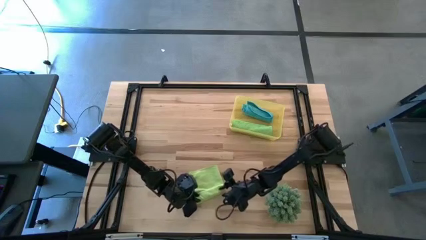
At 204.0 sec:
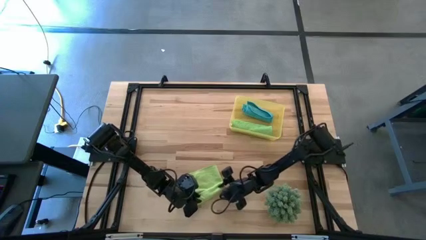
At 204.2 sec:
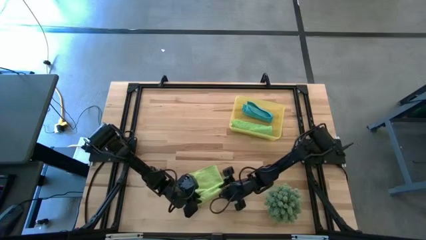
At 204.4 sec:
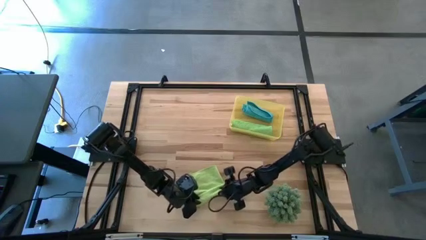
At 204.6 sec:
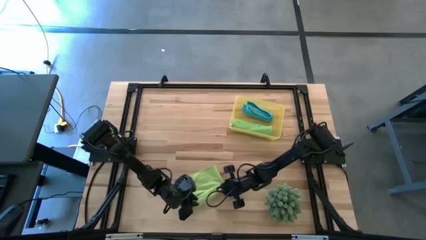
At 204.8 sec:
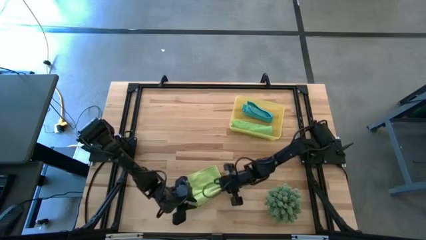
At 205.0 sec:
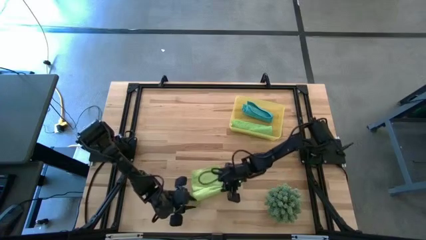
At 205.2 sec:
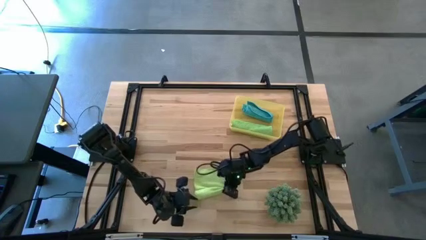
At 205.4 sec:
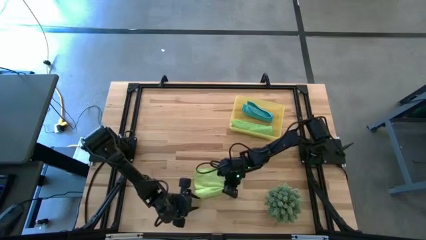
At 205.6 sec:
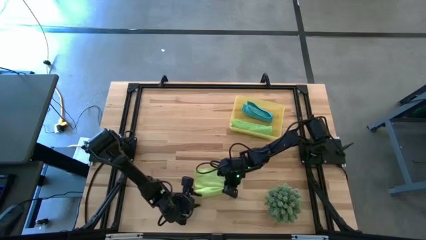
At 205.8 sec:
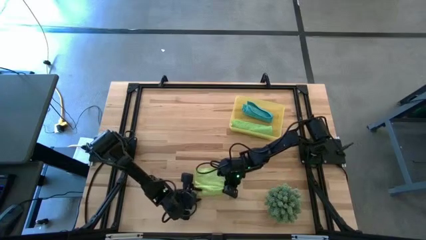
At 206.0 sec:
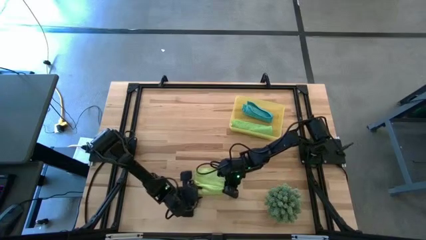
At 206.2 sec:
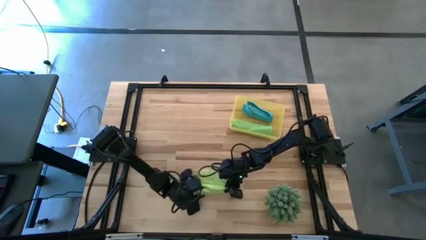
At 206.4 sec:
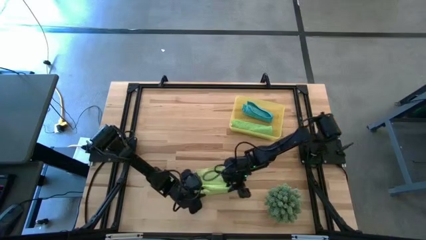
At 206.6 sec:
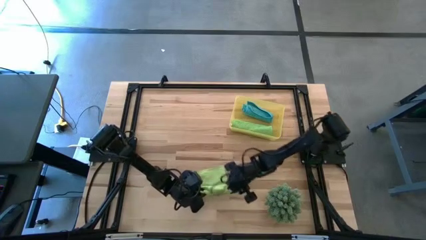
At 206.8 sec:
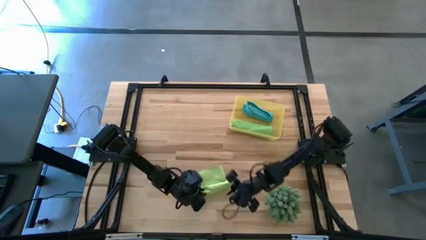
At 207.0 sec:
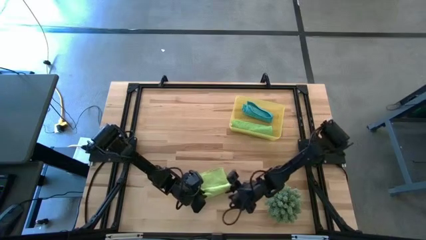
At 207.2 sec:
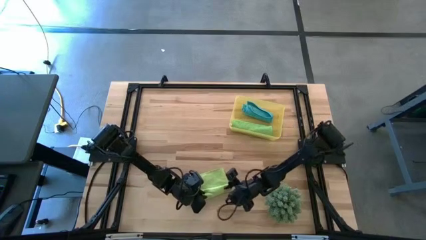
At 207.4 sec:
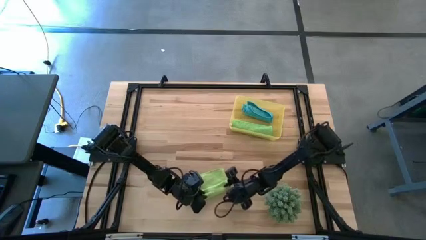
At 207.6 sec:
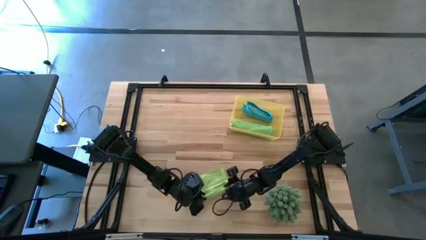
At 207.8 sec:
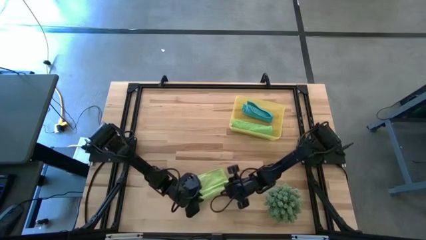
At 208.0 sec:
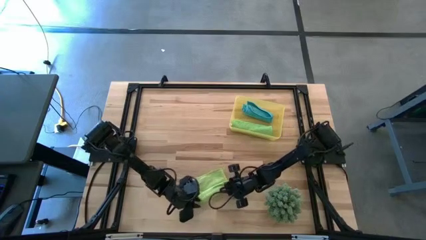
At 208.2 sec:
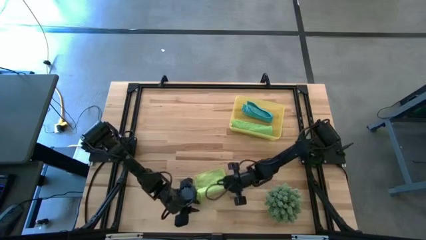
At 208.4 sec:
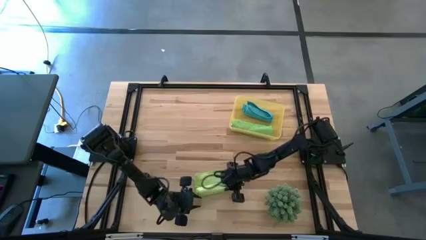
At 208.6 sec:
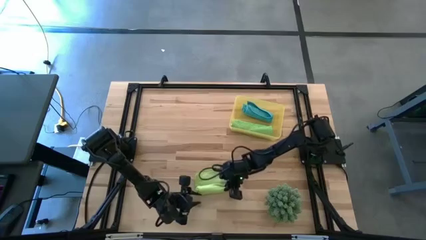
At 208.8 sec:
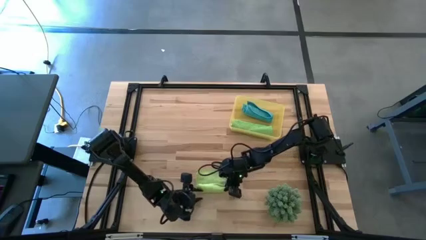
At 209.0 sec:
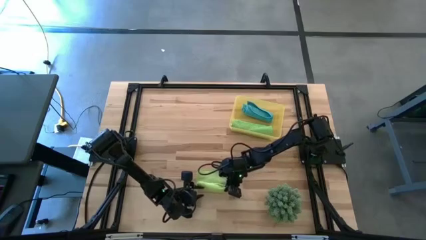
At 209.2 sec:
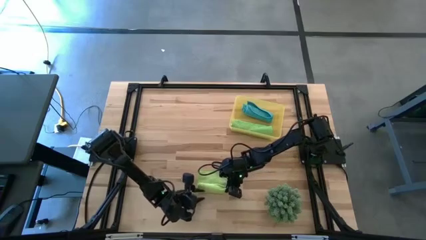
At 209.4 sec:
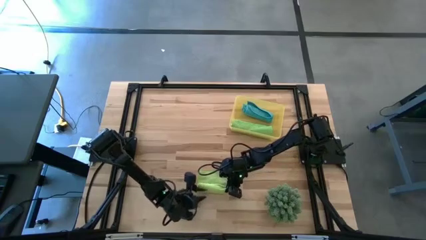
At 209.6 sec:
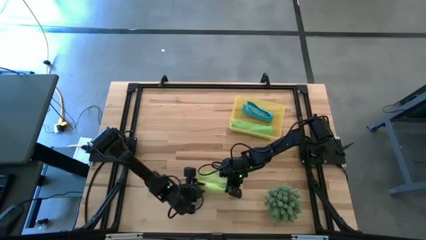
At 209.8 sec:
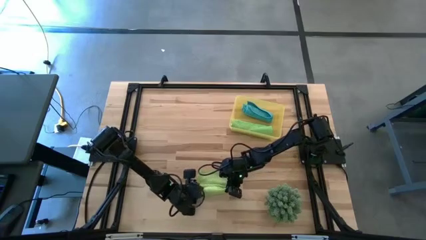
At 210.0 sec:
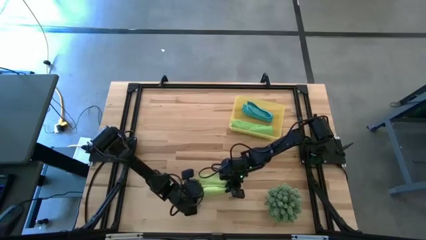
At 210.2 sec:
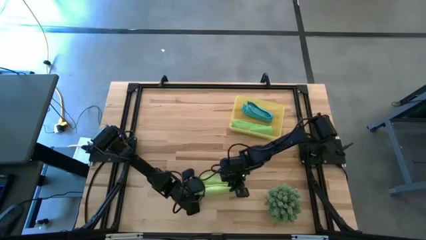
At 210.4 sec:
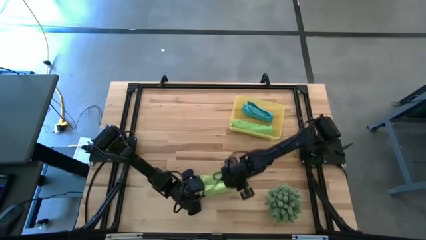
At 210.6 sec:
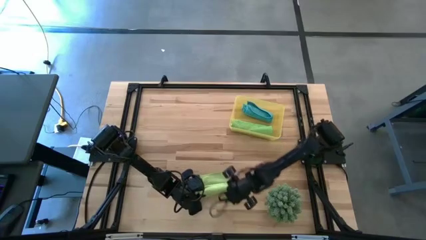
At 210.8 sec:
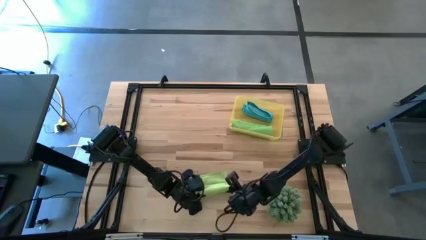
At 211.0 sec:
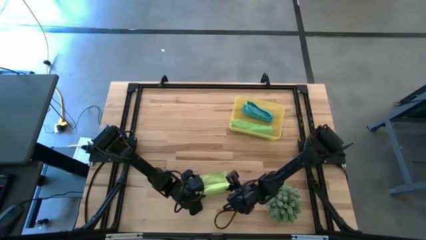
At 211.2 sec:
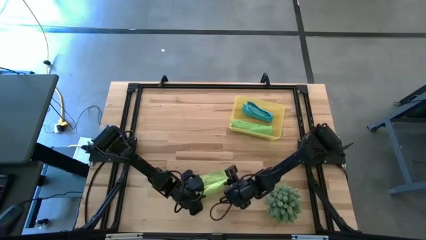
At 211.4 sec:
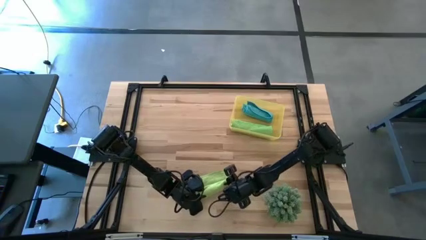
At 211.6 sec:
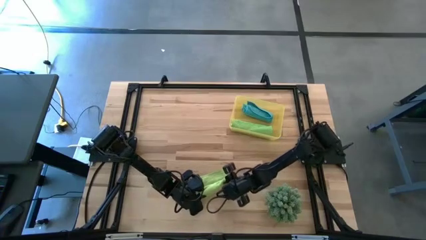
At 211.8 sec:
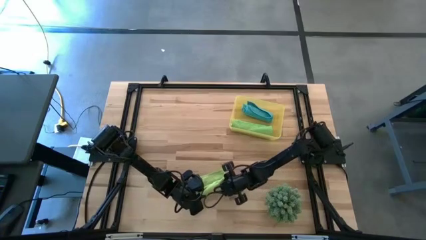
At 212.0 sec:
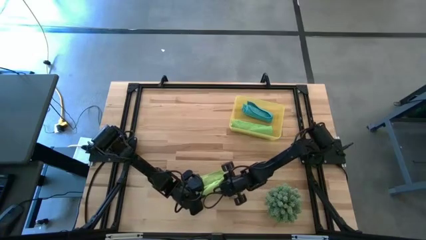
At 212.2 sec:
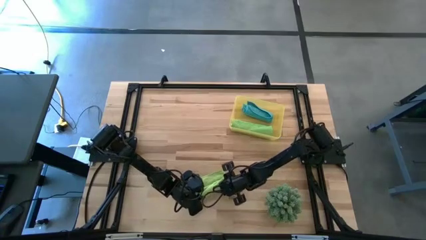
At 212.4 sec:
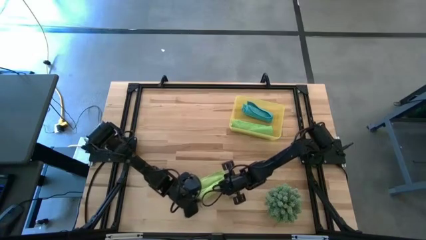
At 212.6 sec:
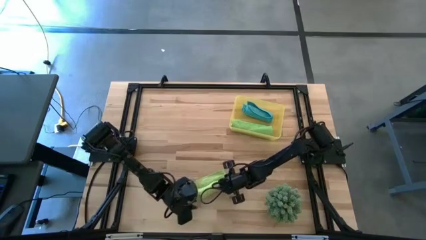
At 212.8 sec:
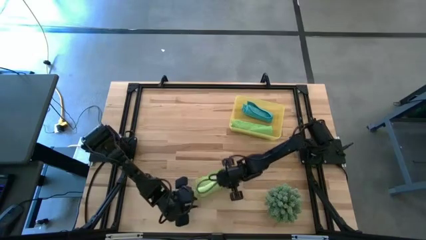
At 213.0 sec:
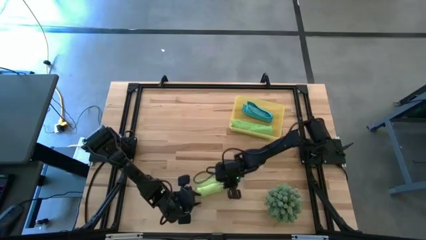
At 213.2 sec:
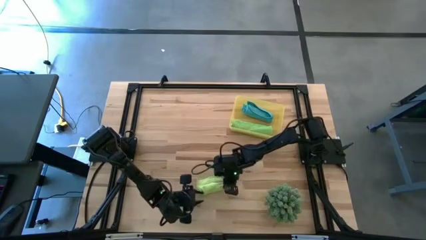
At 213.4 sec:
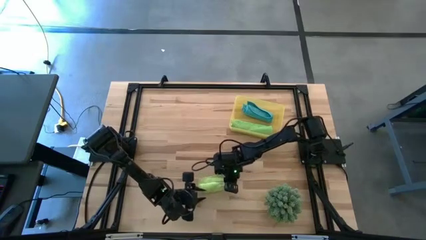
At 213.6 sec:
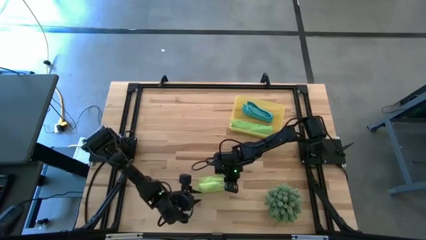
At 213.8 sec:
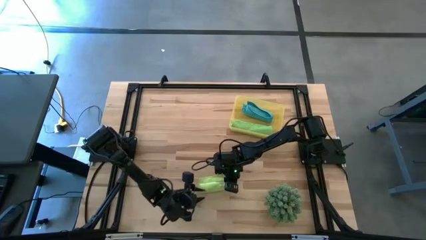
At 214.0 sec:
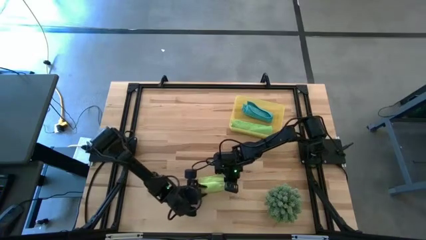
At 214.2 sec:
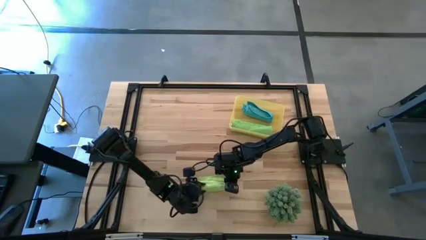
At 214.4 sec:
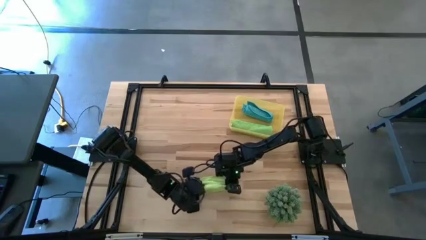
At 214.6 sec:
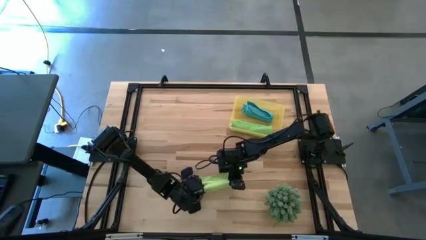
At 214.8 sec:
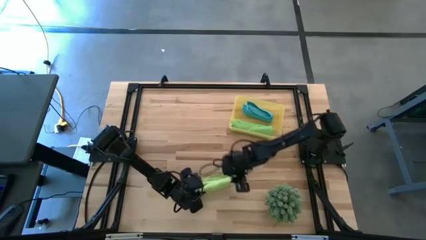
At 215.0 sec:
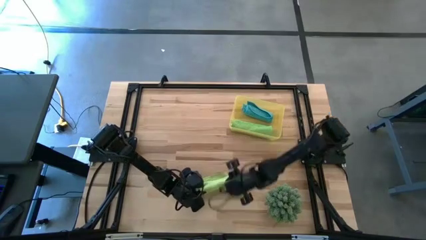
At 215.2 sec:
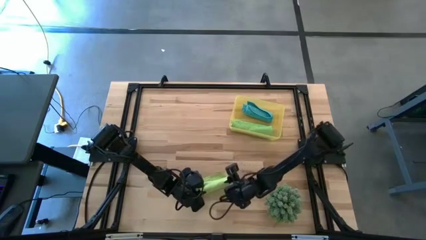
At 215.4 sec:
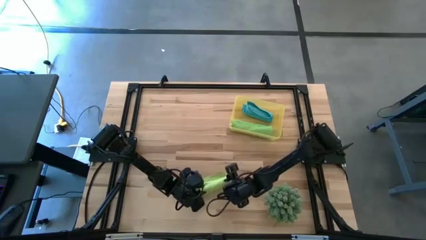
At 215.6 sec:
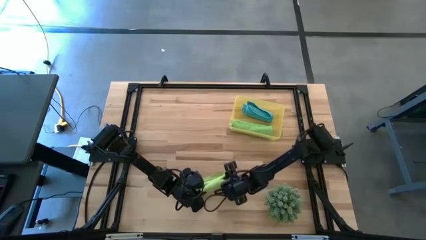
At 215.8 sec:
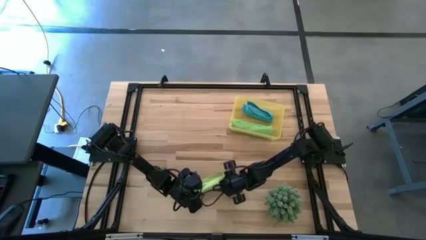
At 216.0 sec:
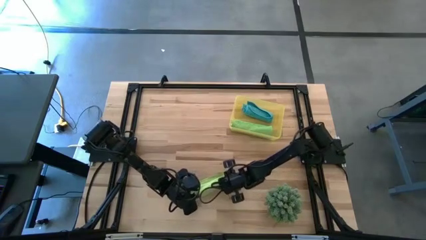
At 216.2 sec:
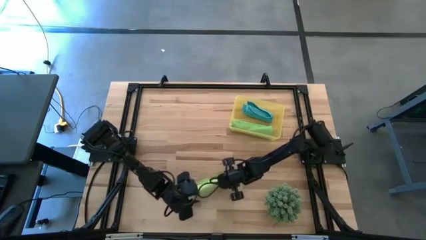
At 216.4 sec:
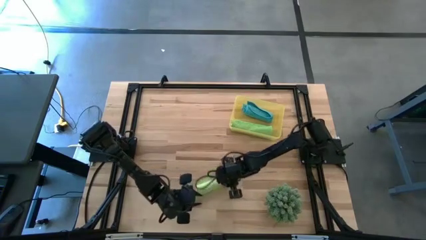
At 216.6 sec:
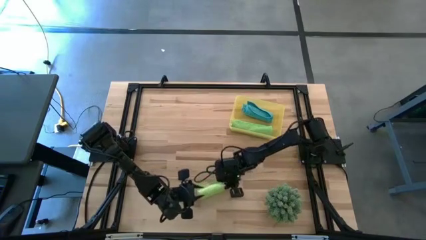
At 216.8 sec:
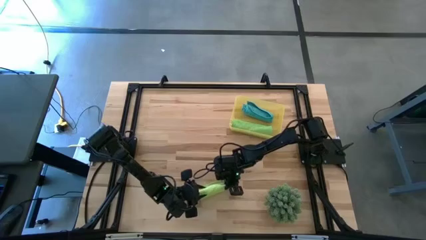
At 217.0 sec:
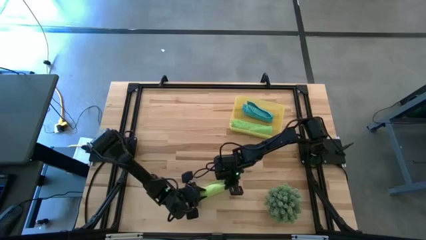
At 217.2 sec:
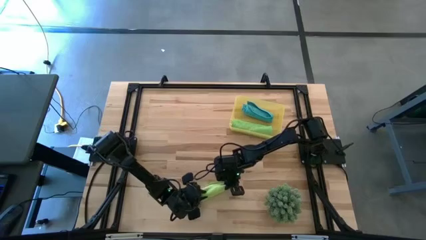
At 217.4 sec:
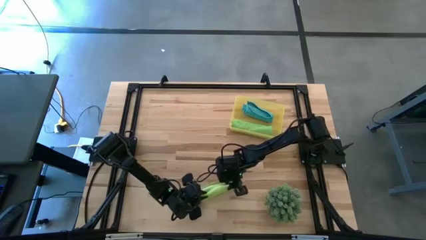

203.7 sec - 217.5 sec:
Task: Roll microfiber towels into tight, uniform cylinder then place into a basket
Roll the green microfiber towel

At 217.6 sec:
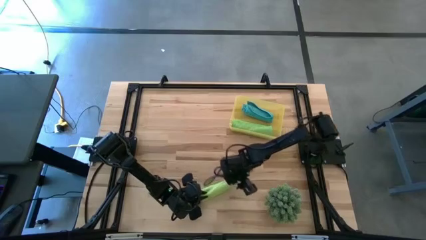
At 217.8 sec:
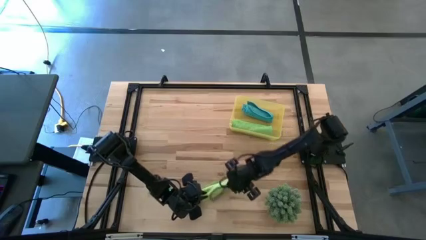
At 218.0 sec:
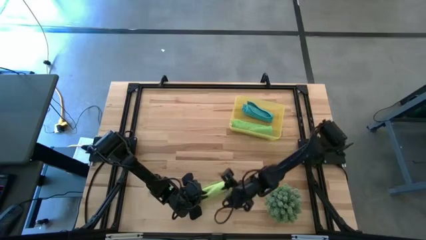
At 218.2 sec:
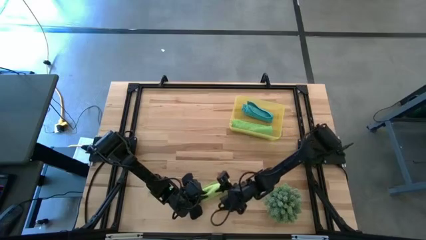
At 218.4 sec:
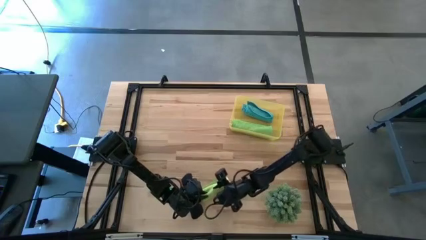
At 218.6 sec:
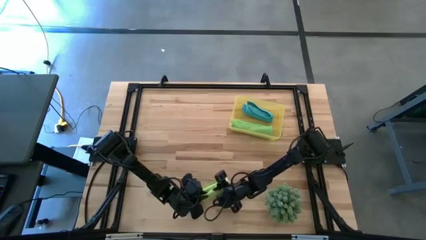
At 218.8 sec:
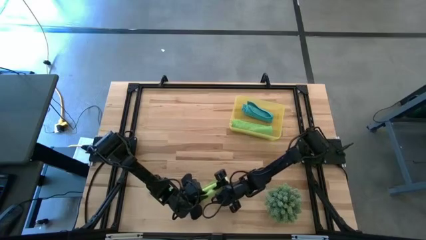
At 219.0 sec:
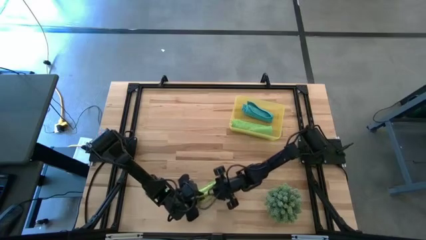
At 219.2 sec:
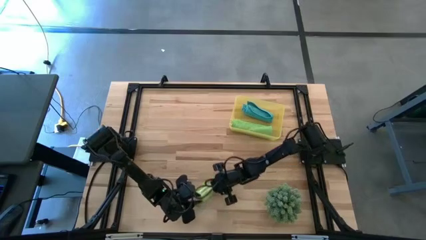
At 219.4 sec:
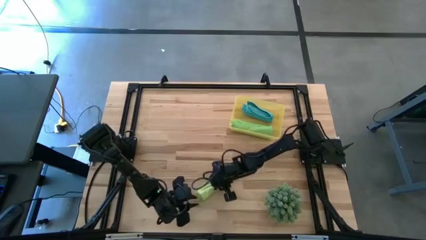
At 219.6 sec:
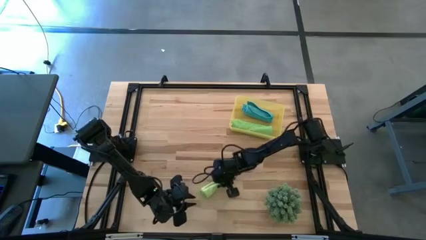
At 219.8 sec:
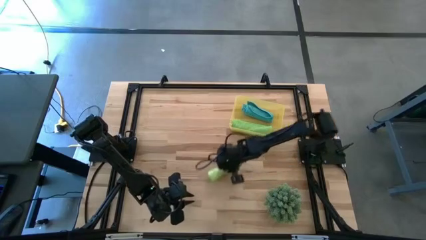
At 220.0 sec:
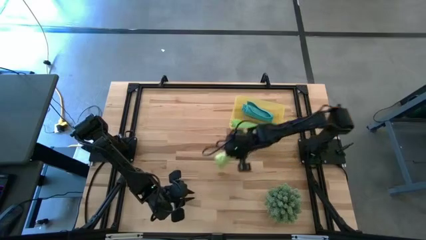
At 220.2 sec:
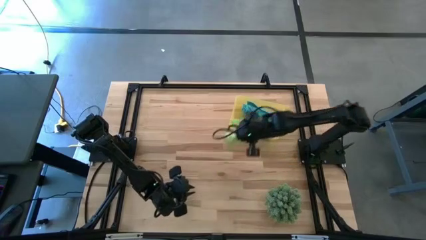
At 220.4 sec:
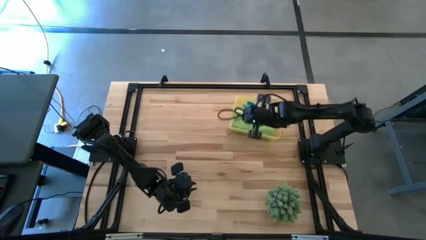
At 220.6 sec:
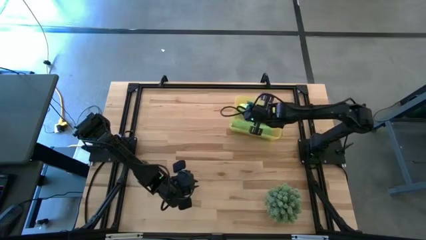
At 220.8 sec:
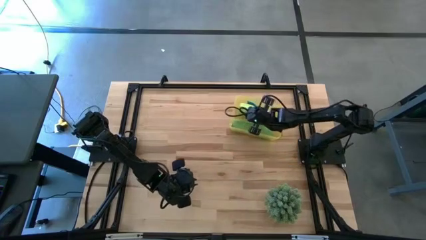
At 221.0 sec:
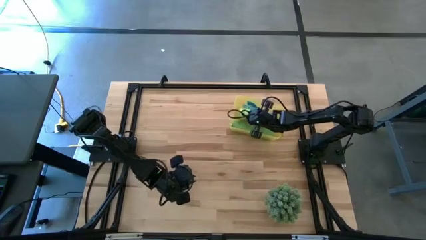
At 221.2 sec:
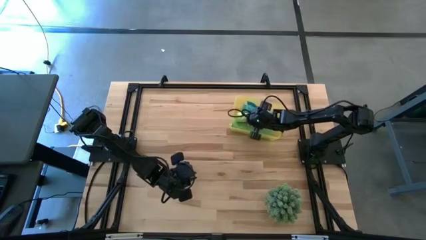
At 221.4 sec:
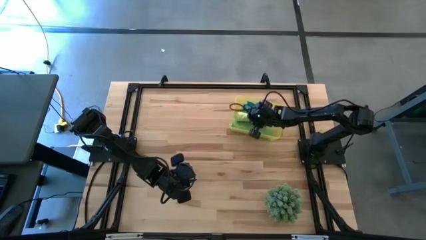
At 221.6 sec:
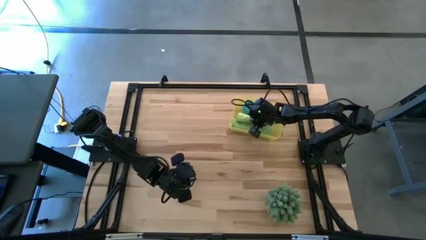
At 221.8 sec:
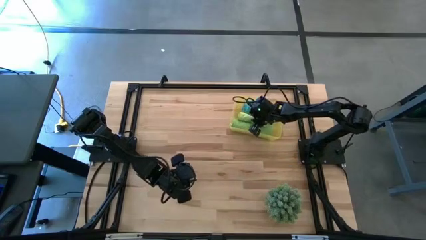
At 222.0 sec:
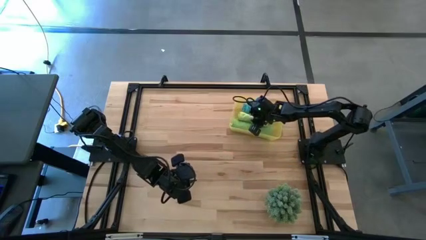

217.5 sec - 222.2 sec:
Put the rolled green microfiber towel into the yellow bin
